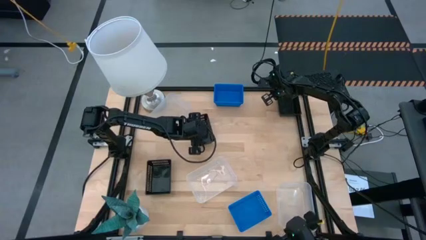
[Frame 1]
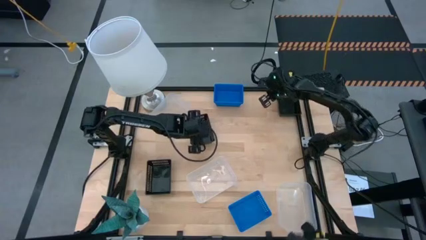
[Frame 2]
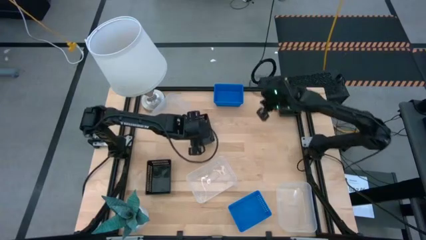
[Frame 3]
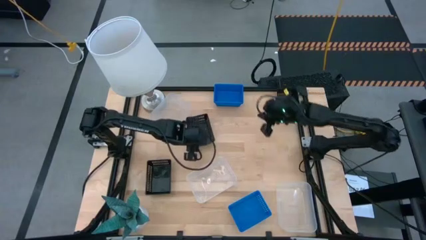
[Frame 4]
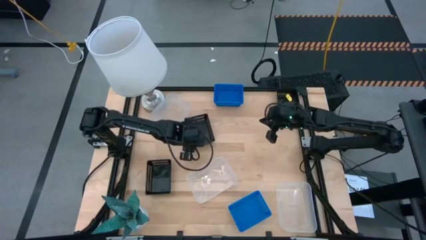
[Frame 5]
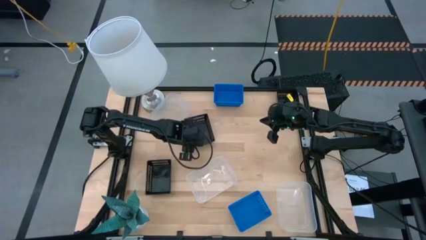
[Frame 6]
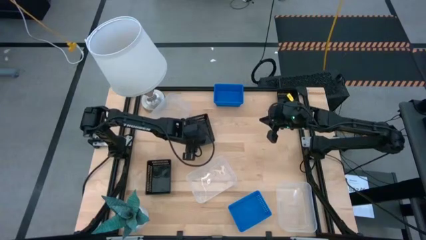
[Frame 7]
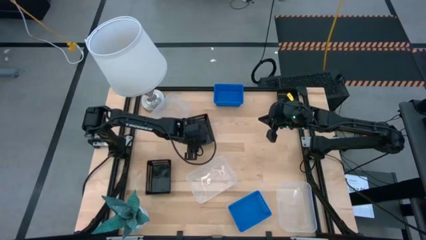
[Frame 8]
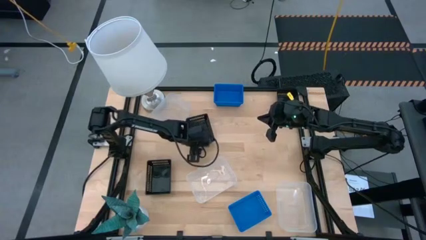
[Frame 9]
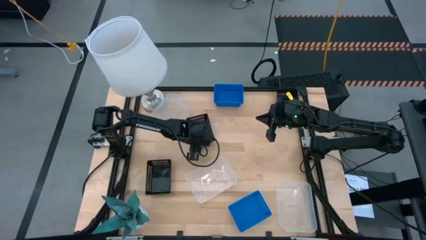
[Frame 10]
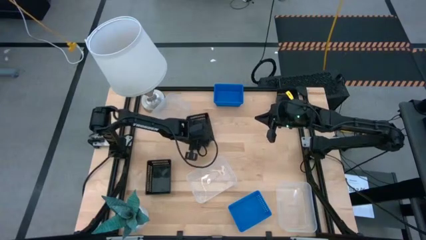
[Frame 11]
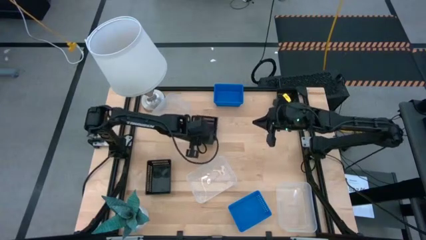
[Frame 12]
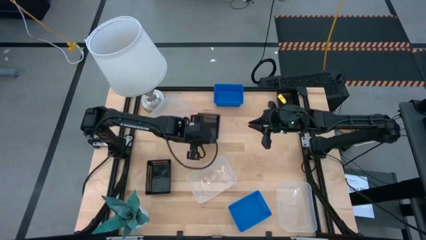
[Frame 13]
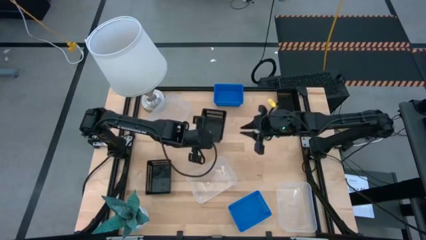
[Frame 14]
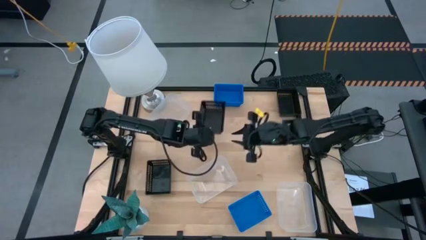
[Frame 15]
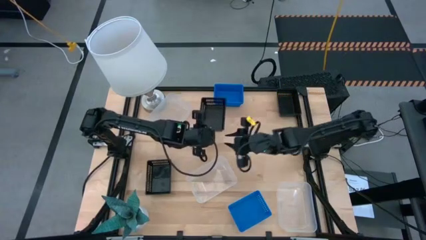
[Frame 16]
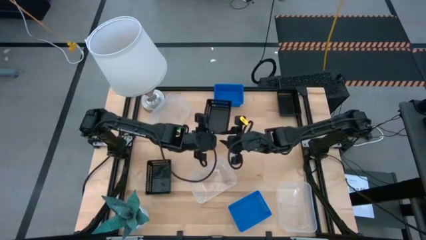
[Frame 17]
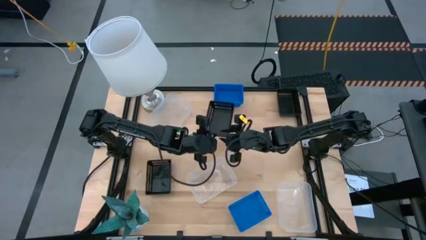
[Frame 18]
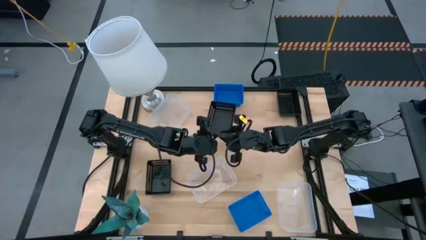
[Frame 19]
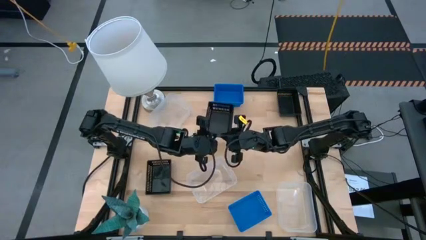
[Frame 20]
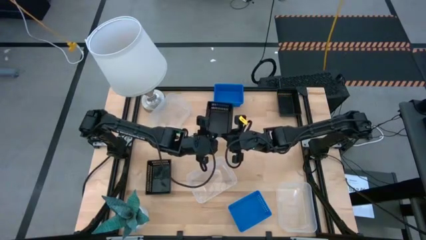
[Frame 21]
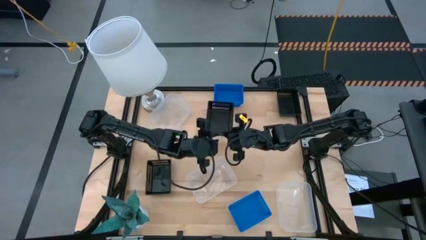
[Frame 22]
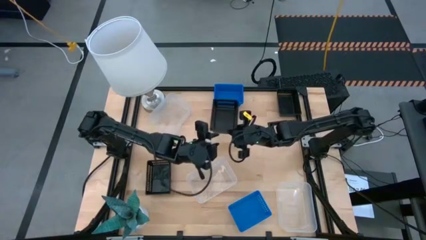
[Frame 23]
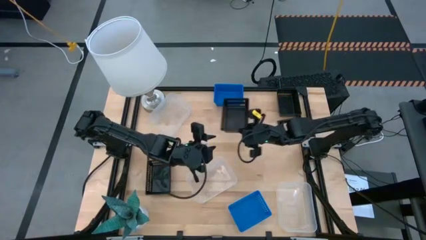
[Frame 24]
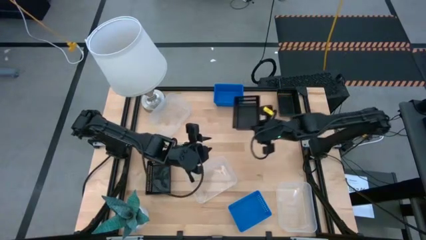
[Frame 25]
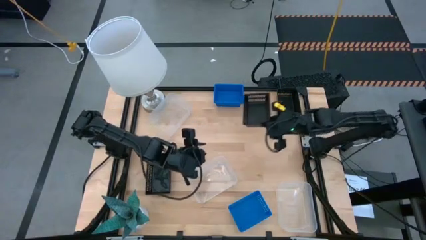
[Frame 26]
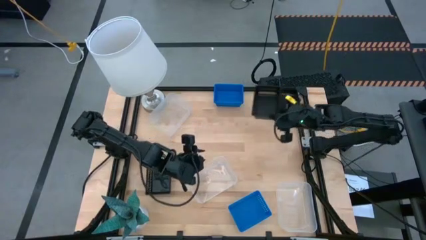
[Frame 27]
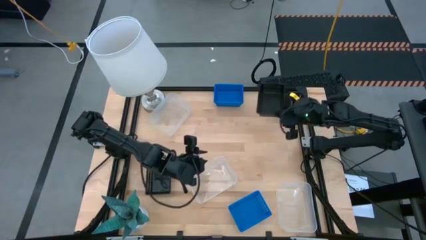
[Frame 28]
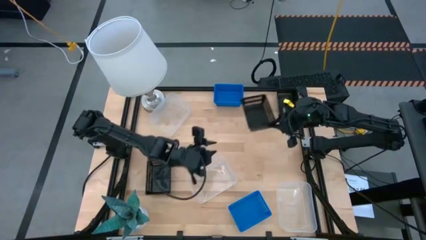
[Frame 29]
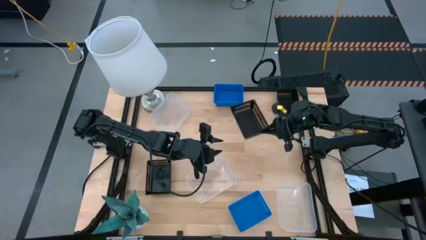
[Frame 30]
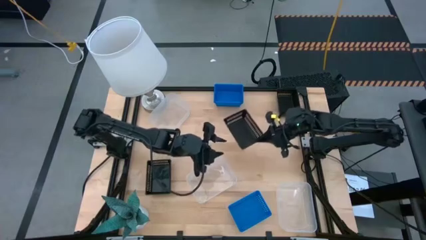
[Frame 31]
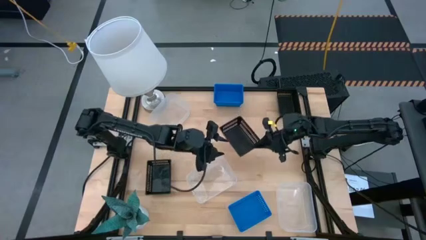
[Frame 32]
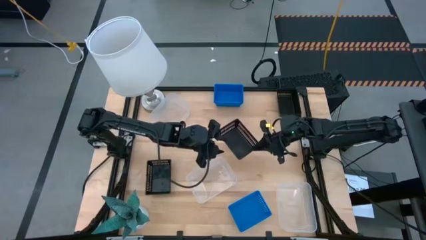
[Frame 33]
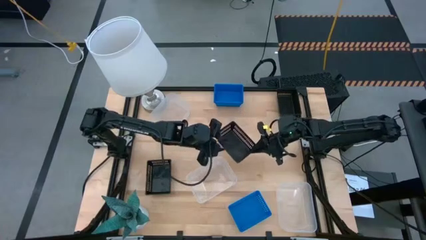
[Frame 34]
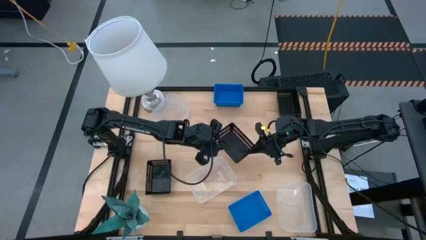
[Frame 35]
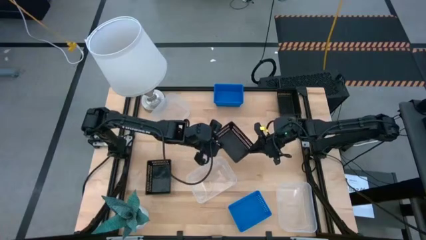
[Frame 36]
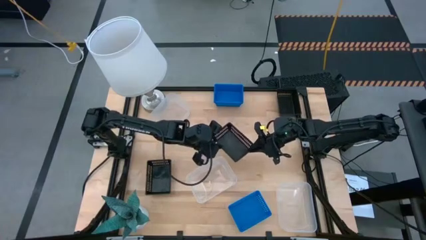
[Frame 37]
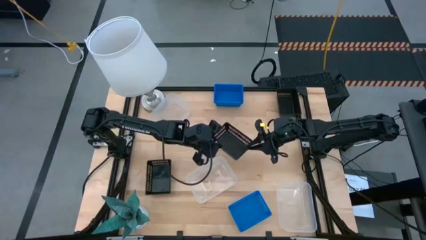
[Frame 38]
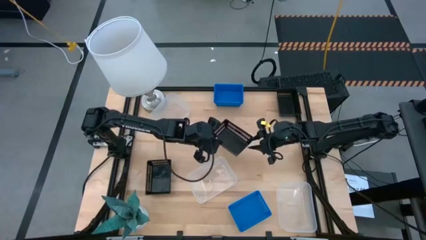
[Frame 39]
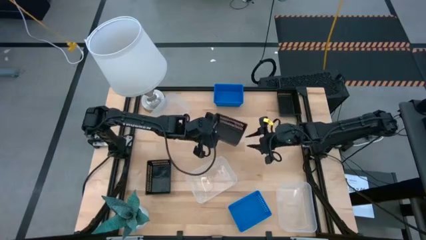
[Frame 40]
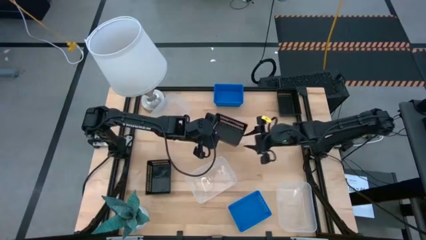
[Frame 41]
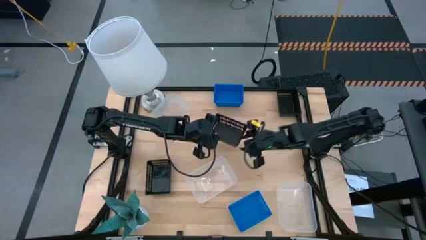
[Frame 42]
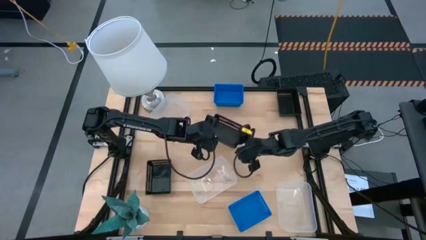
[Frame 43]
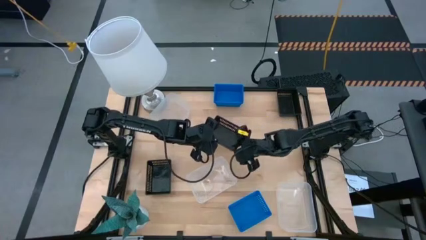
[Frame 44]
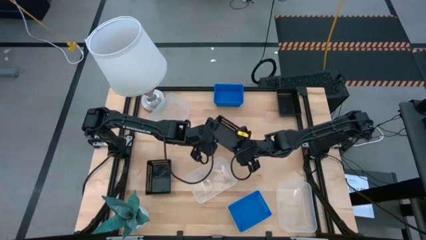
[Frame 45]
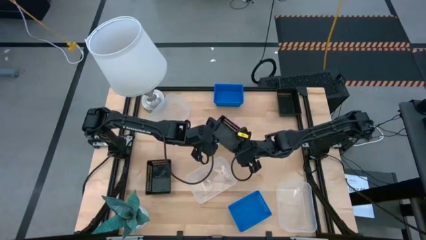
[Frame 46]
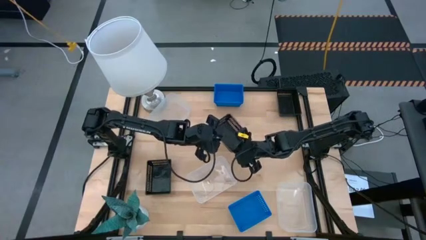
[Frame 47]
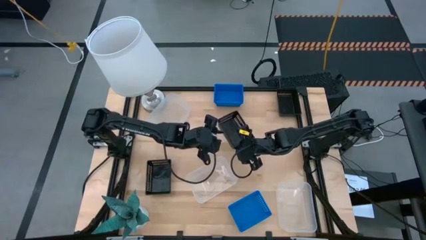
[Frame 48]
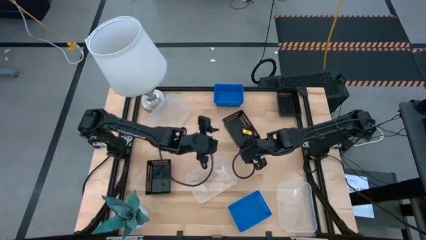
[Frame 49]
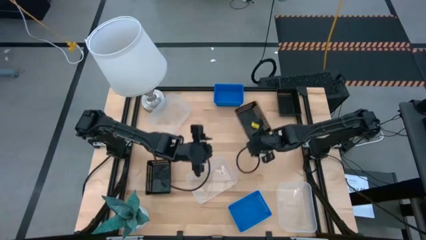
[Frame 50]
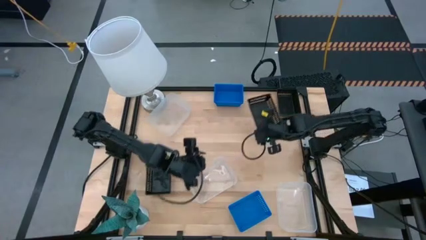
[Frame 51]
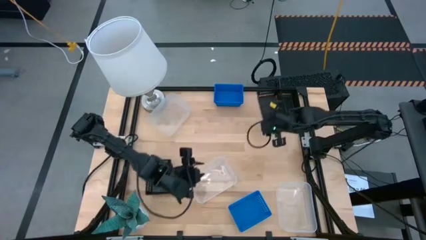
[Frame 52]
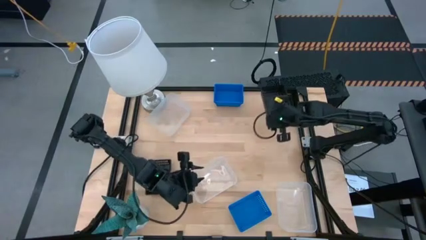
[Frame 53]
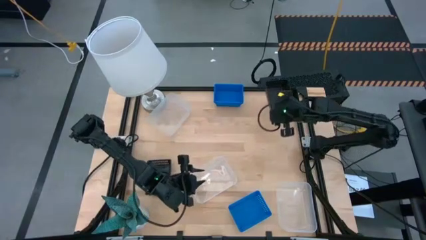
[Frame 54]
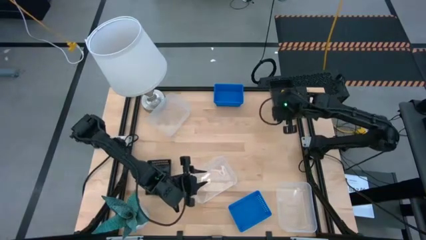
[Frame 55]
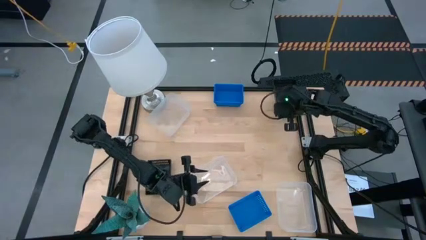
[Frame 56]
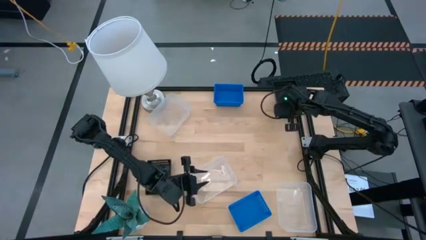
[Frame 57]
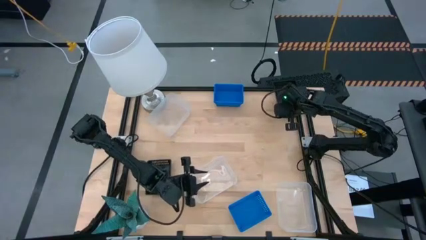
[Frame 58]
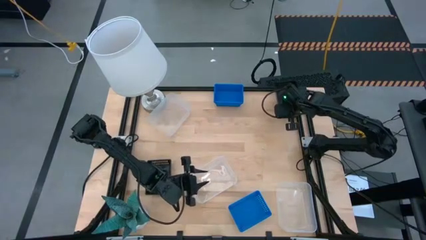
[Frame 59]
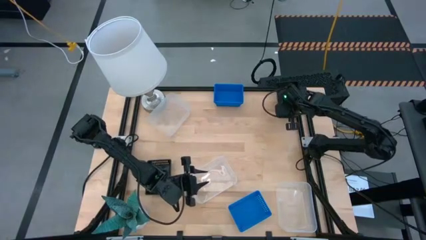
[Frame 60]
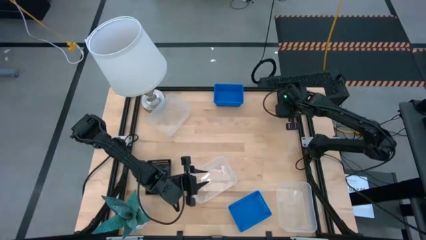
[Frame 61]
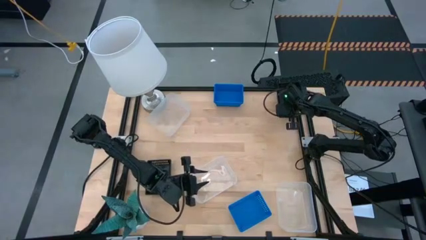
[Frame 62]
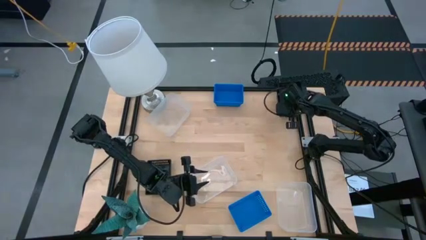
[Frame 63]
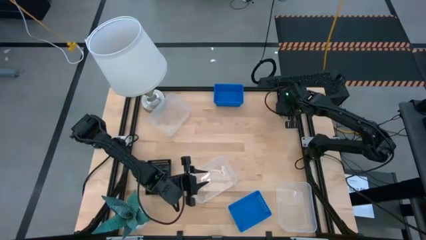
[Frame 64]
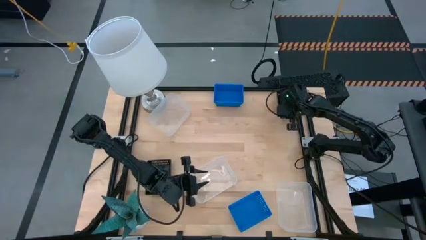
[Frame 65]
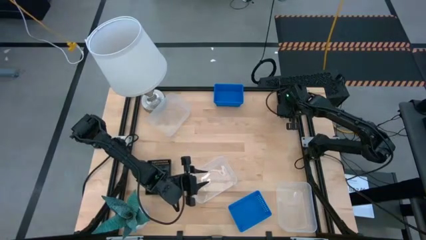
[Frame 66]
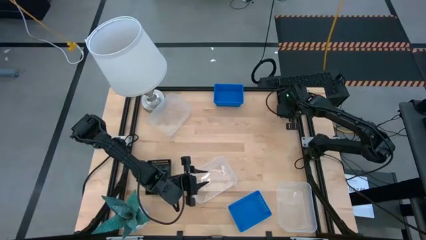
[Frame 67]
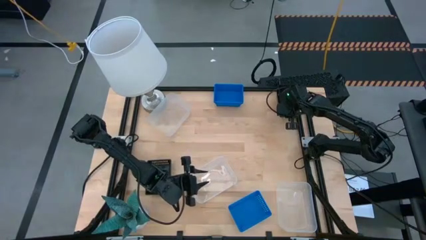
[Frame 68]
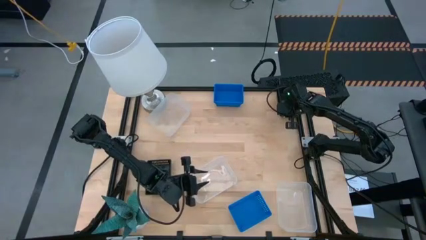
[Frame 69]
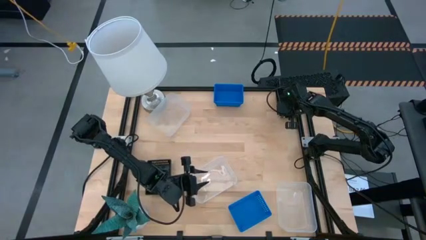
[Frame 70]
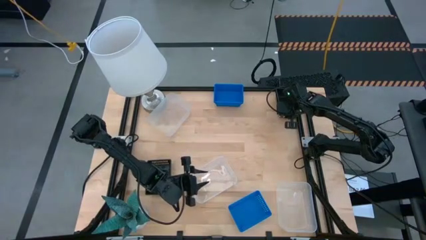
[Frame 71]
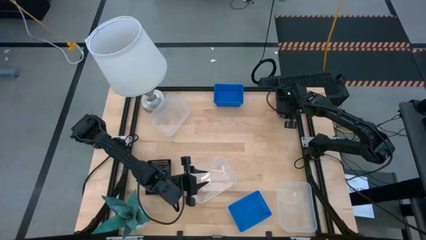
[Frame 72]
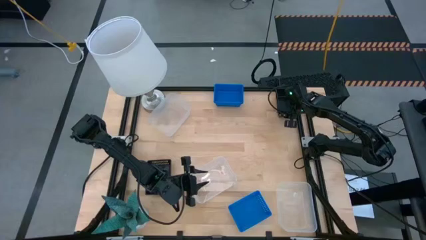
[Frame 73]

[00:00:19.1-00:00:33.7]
Stack the middle black bin on top of the top black bin
